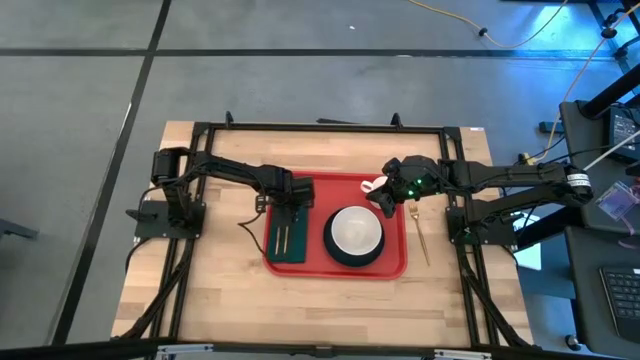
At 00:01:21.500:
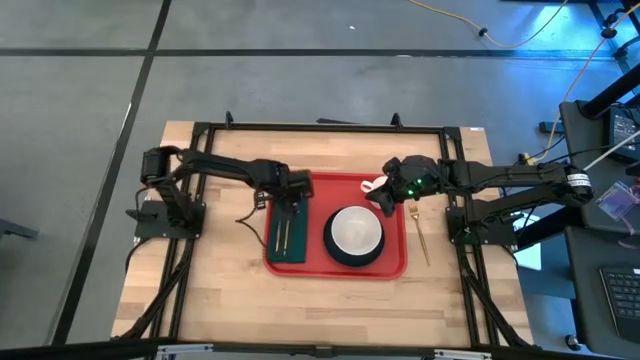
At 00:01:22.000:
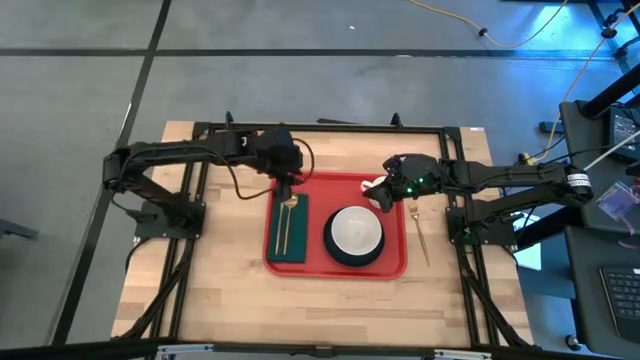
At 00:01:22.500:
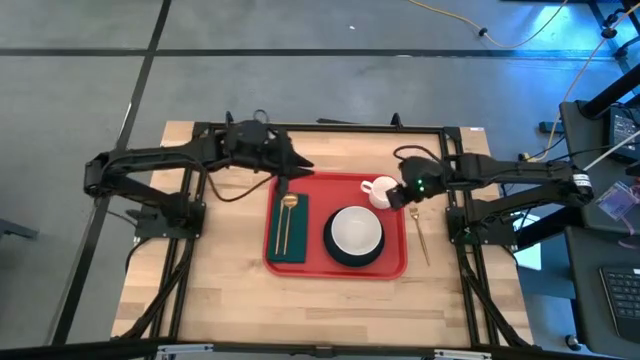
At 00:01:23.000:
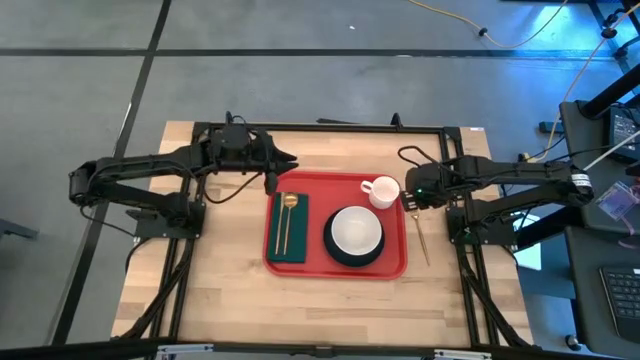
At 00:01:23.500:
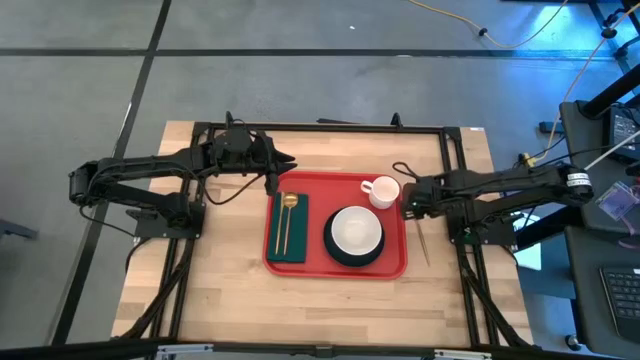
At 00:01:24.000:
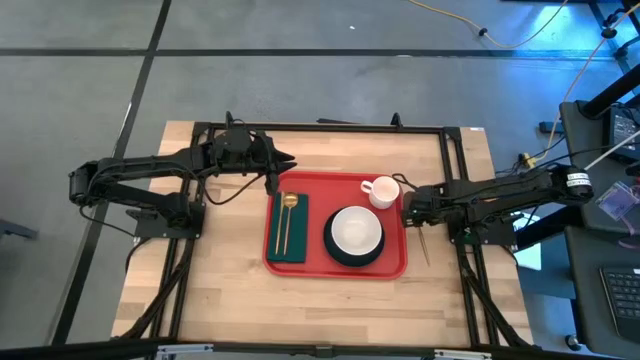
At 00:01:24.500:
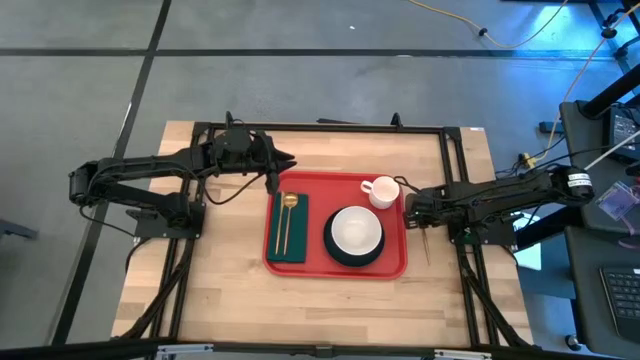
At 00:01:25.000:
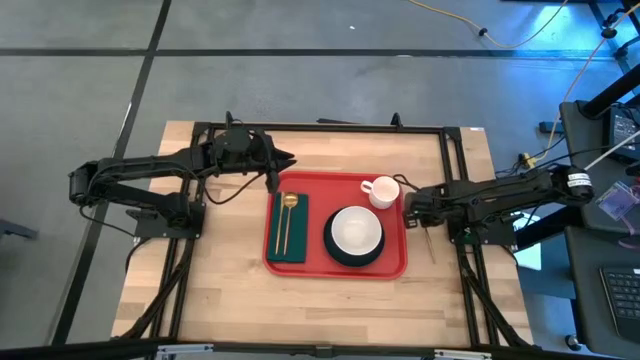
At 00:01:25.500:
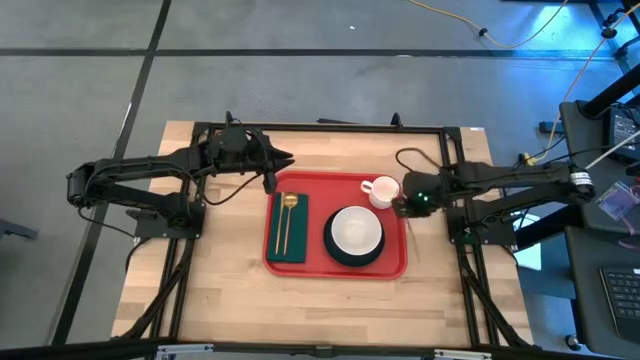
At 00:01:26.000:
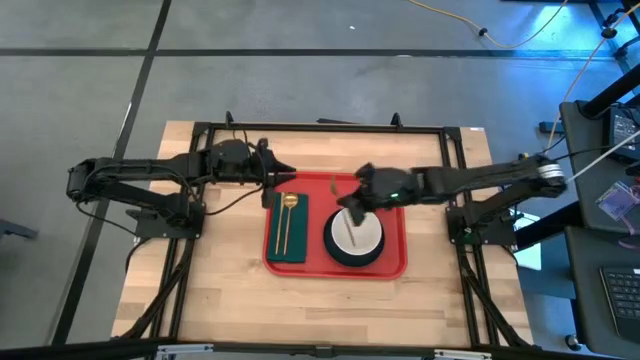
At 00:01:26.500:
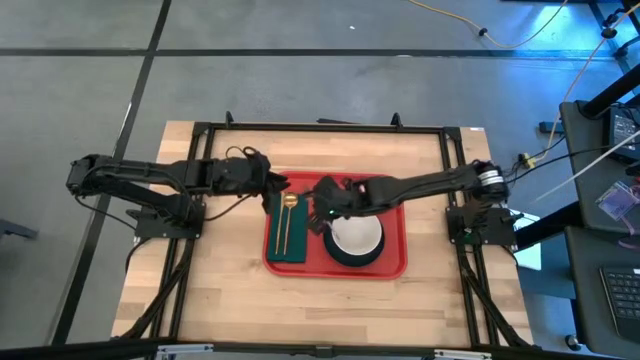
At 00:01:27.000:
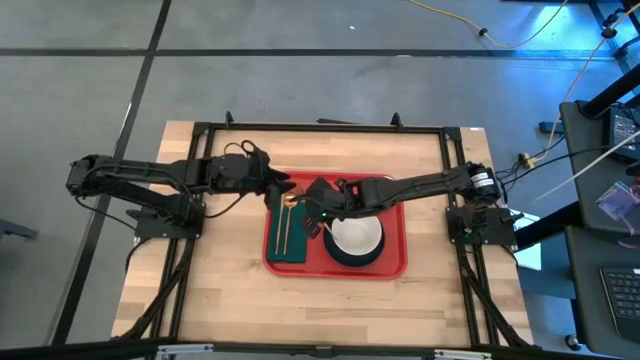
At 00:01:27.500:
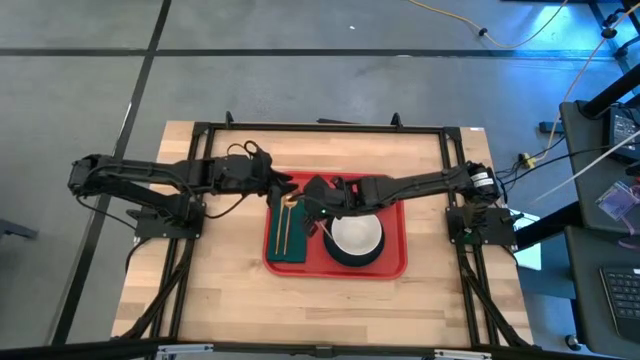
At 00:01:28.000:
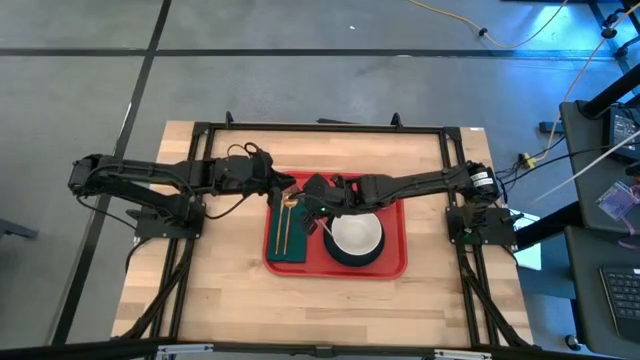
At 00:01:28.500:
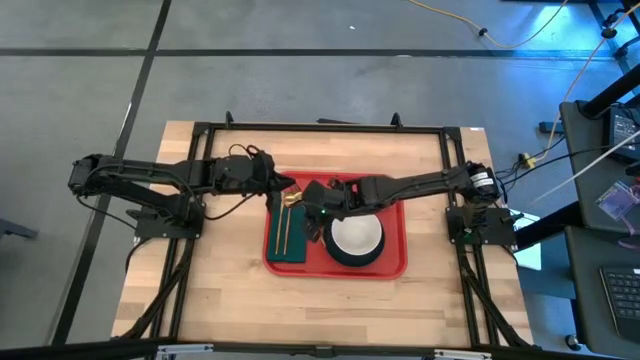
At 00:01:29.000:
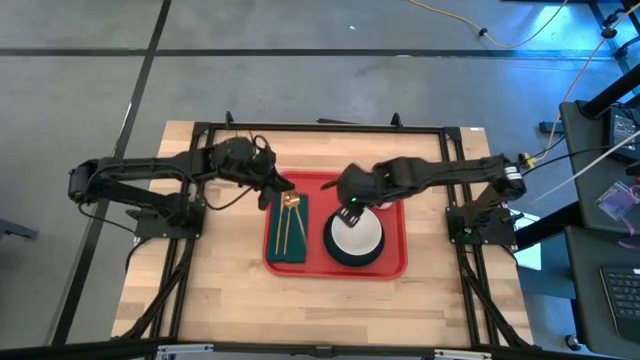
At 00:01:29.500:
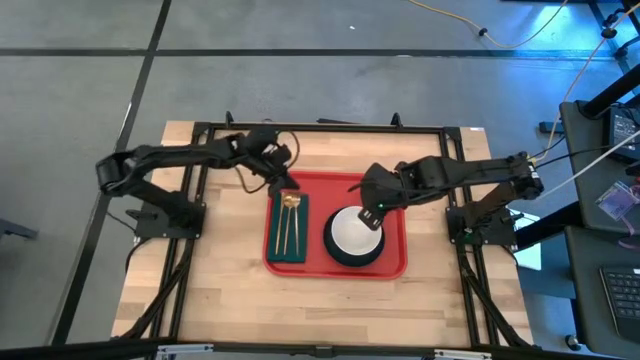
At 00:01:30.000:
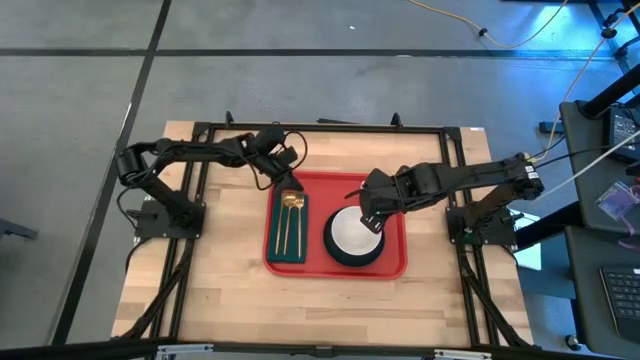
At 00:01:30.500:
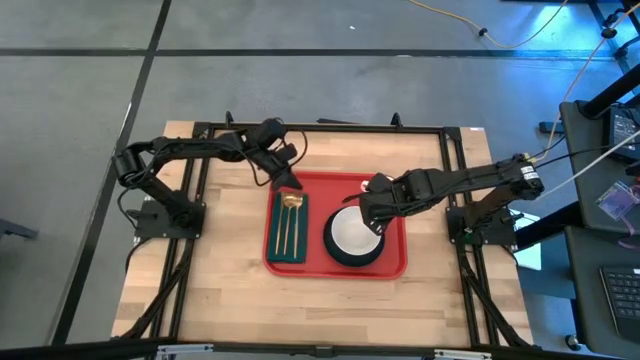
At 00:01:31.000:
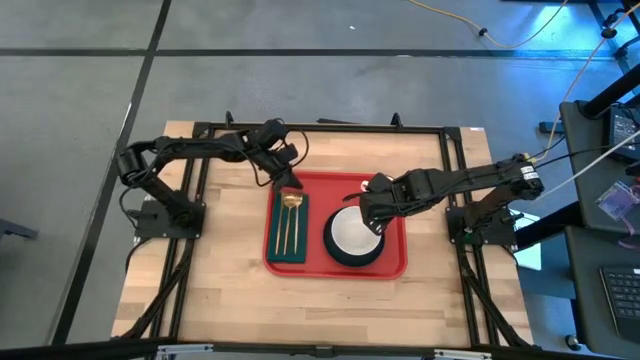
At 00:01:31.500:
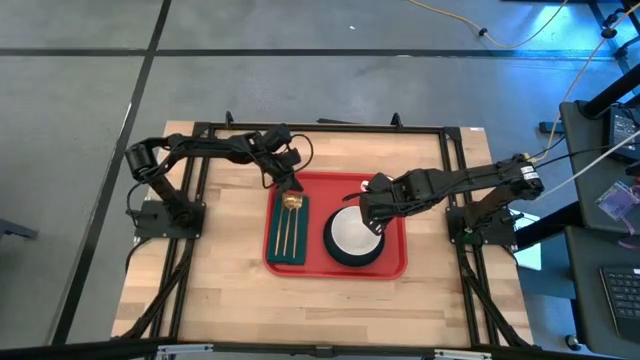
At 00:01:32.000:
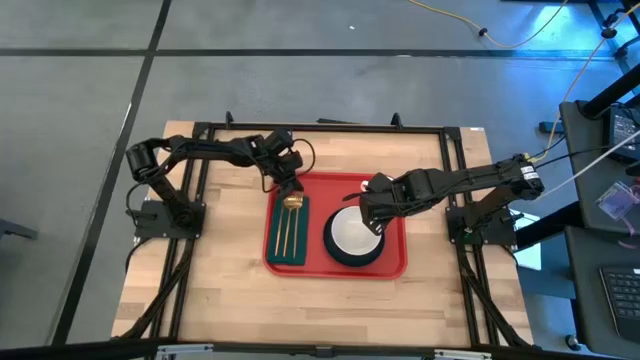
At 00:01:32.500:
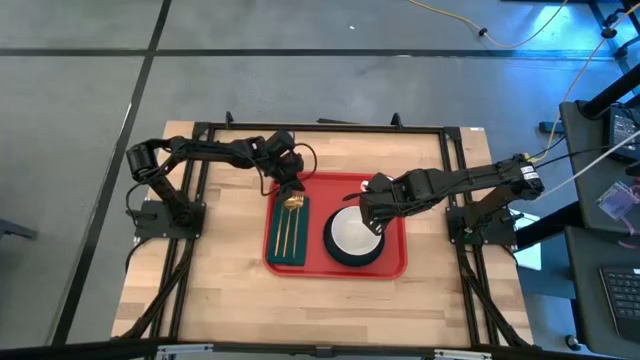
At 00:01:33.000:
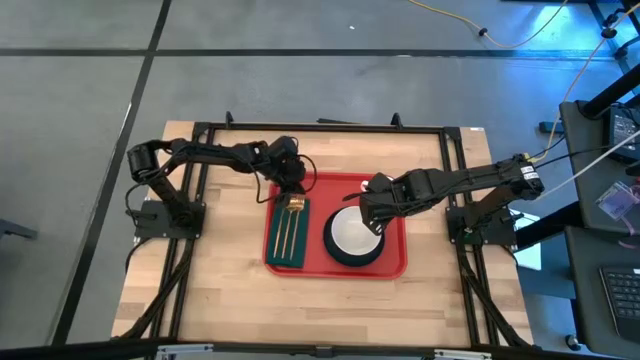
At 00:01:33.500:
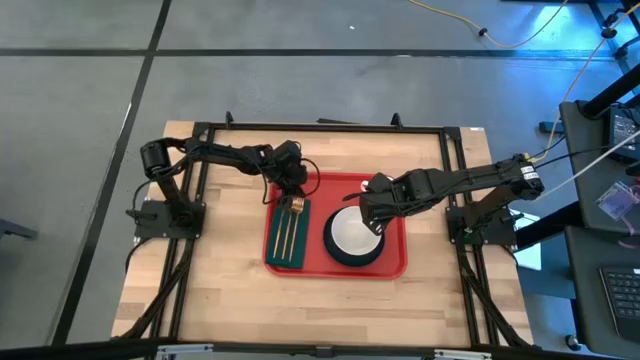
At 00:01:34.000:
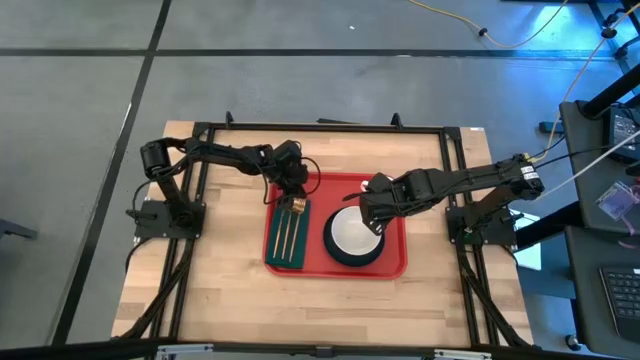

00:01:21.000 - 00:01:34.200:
Task: Set up tray
Put the gold fork on the dark green napkin to the right of the gold spoon

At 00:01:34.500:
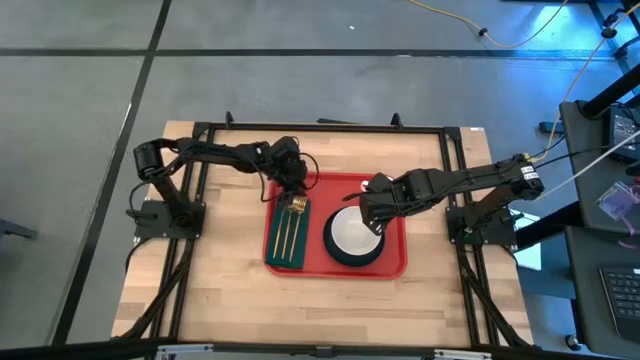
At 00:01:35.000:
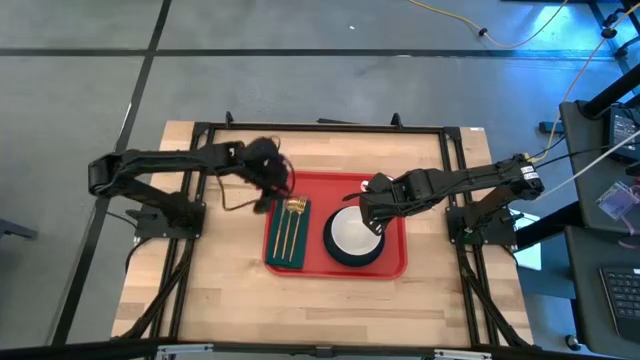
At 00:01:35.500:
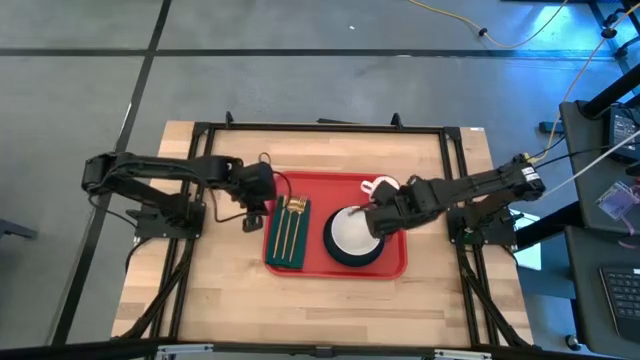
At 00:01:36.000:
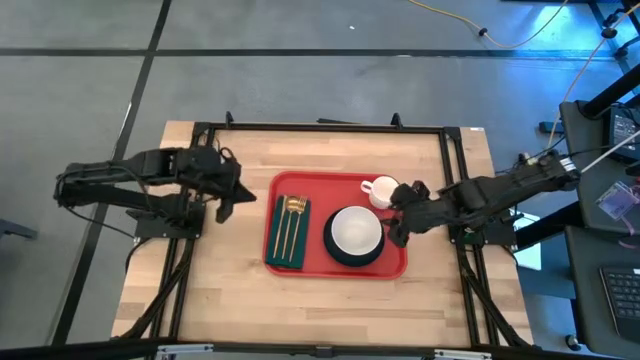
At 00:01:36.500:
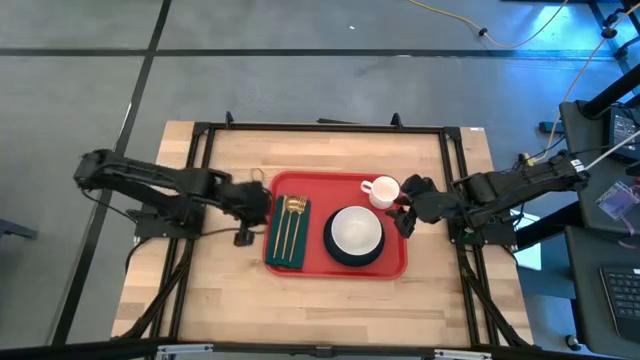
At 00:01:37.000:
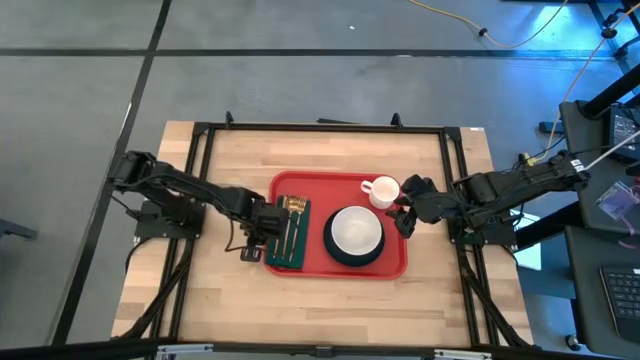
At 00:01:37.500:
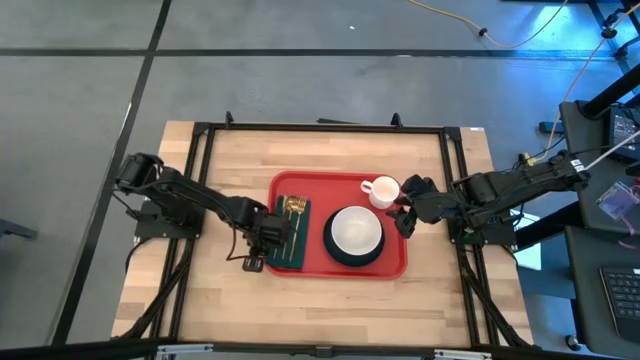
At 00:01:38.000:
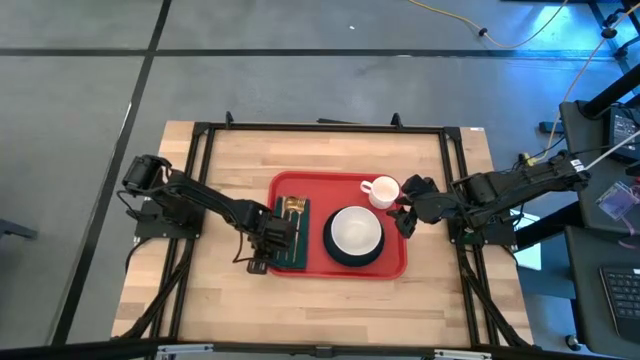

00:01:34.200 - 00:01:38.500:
Adjust the green napkin on the orange tray

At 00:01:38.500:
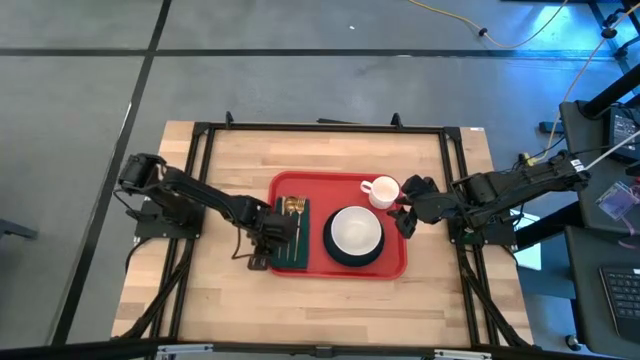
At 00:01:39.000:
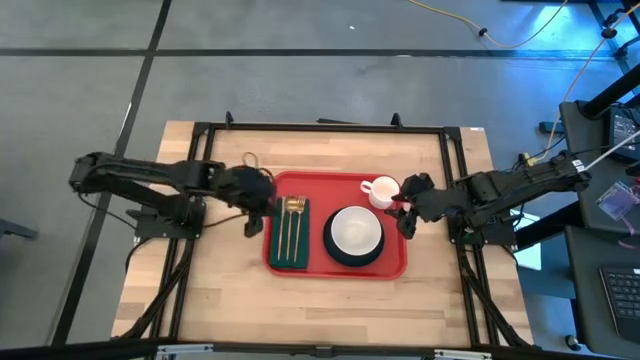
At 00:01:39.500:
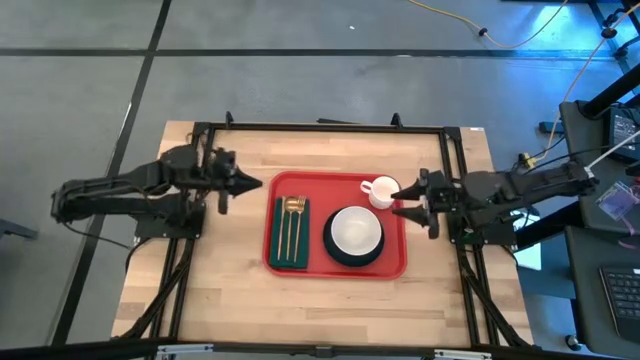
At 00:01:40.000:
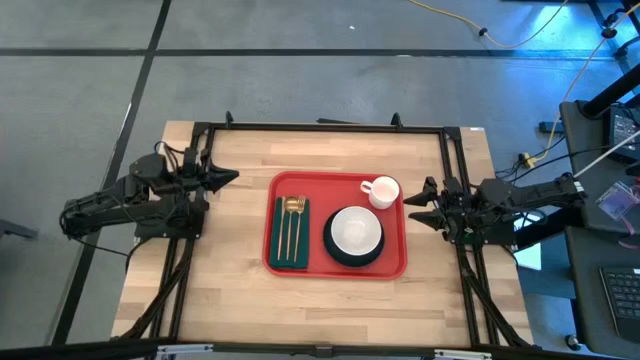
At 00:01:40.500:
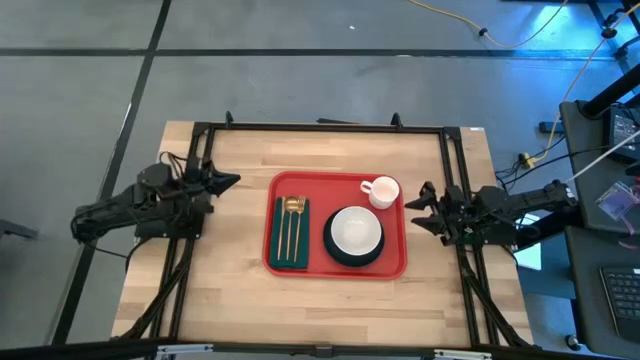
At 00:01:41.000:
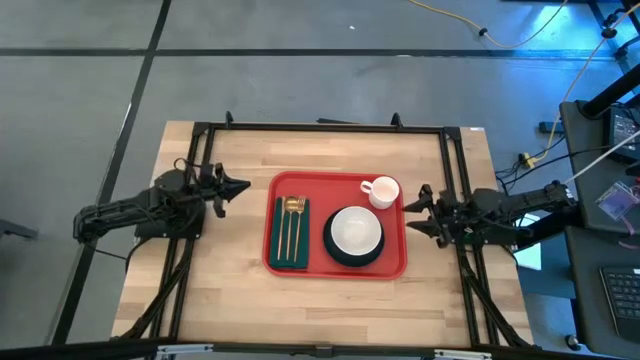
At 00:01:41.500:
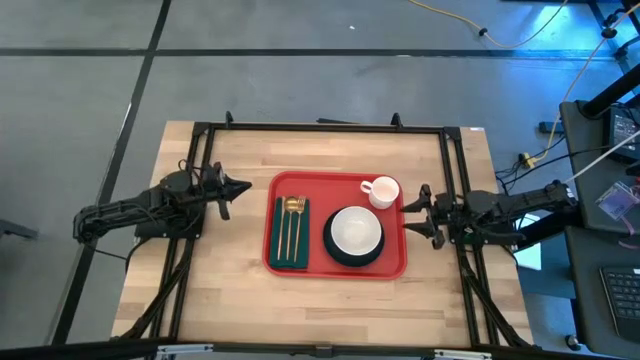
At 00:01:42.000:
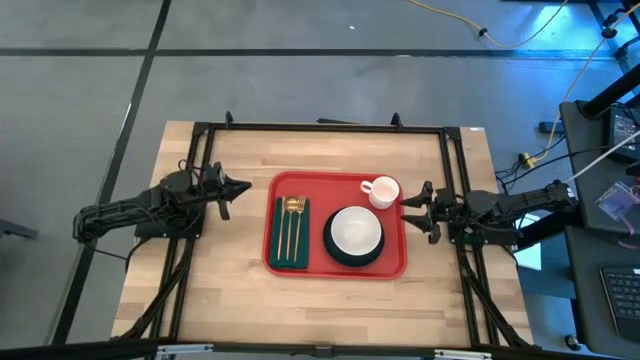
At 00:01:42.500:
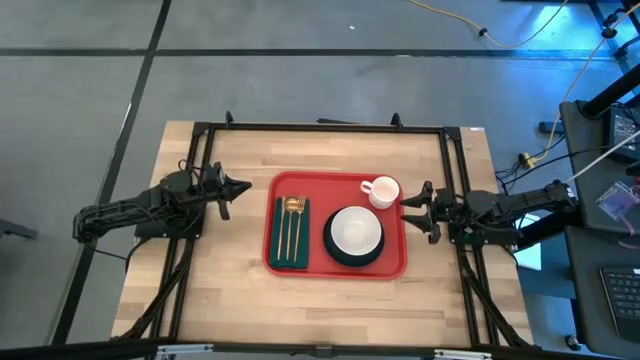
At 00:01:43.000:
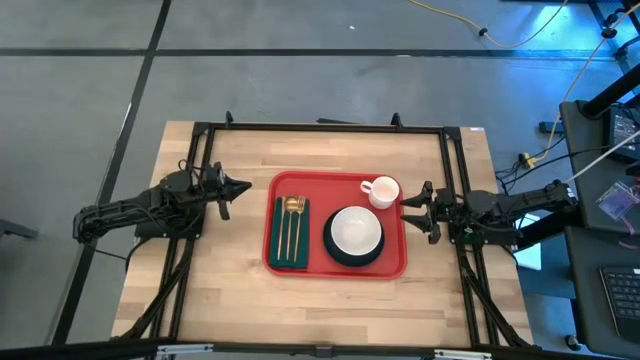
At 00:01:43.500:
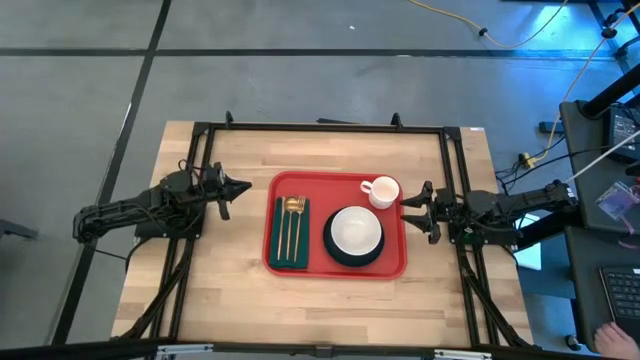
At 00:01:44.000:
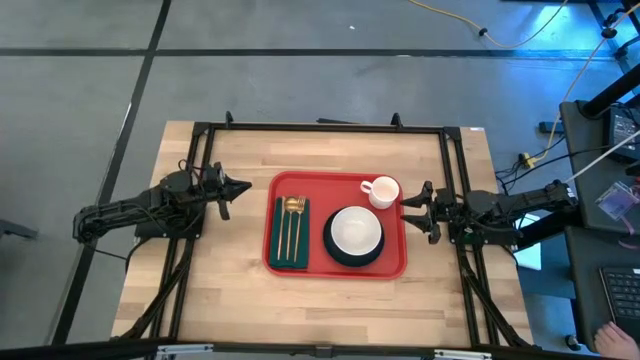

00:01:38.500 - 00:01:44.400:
Return to Home Position
